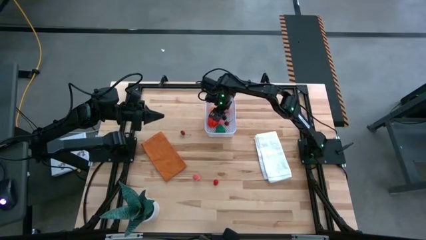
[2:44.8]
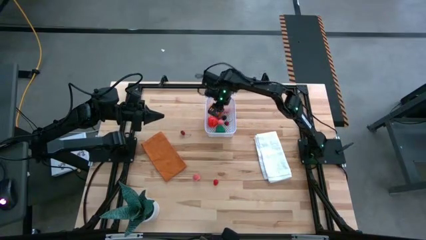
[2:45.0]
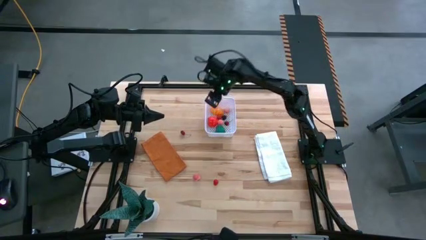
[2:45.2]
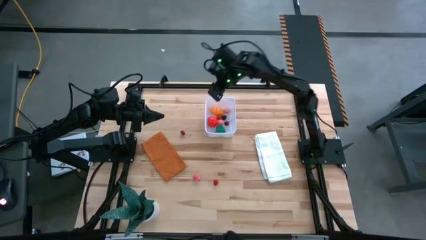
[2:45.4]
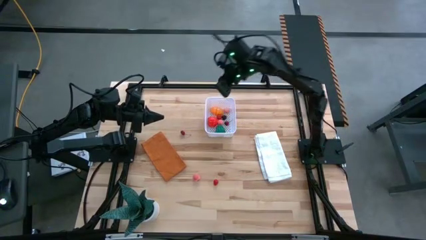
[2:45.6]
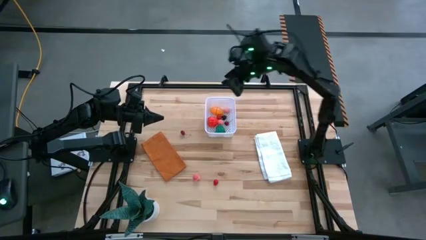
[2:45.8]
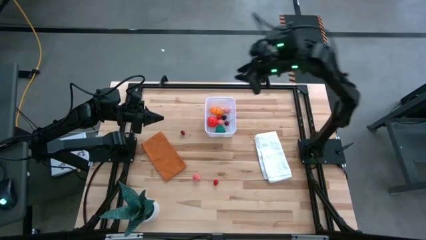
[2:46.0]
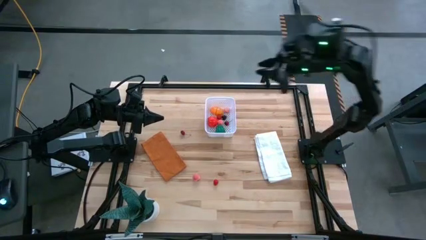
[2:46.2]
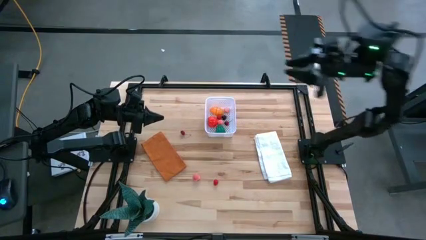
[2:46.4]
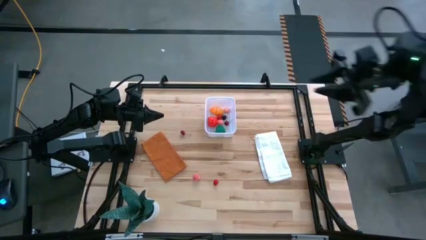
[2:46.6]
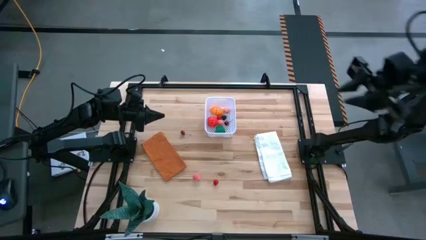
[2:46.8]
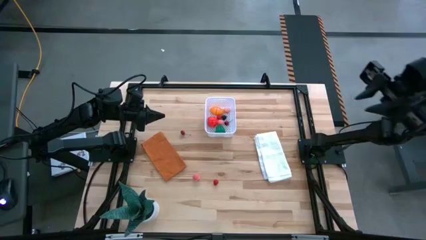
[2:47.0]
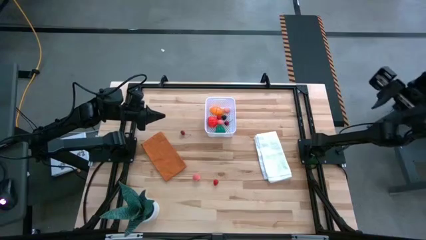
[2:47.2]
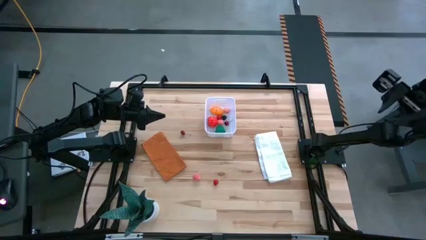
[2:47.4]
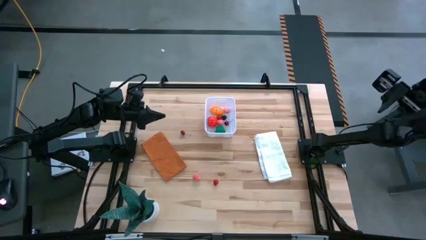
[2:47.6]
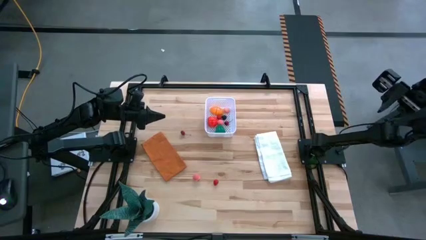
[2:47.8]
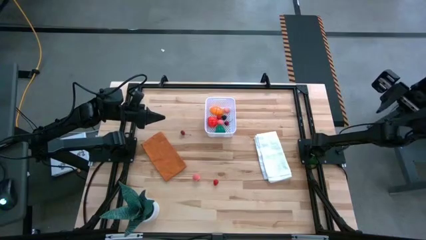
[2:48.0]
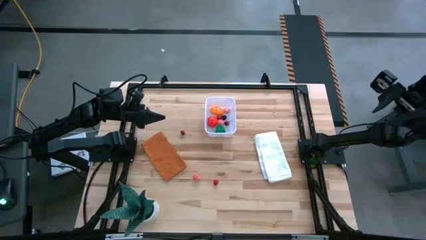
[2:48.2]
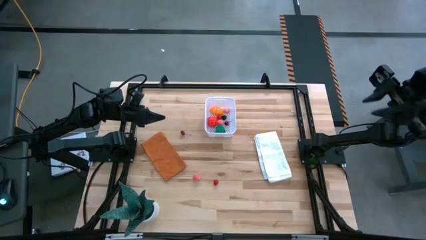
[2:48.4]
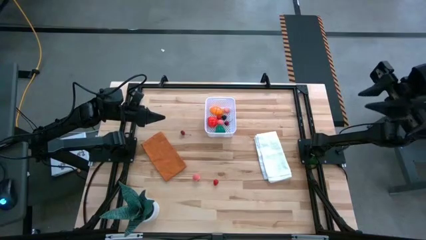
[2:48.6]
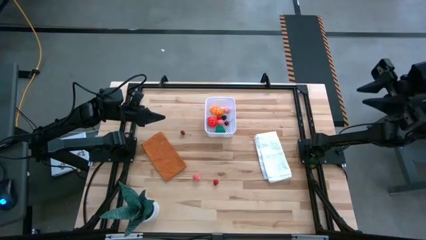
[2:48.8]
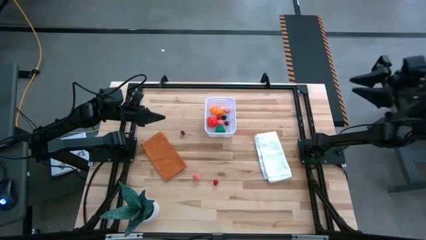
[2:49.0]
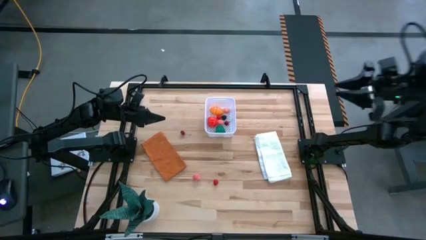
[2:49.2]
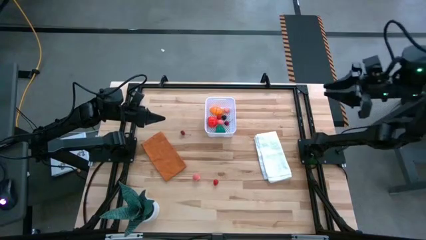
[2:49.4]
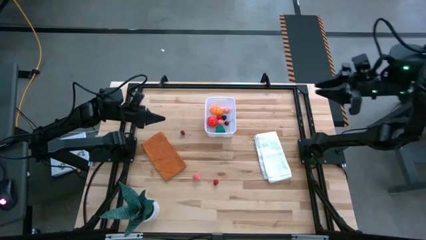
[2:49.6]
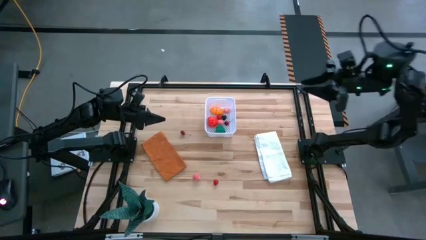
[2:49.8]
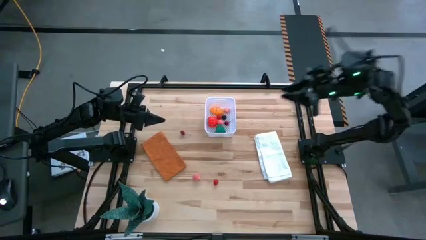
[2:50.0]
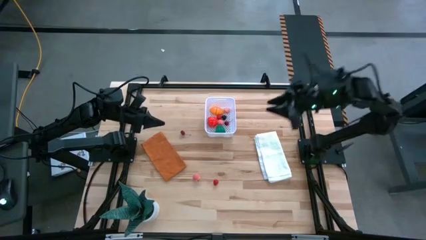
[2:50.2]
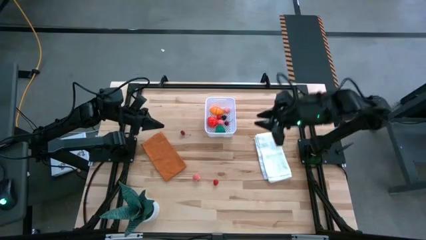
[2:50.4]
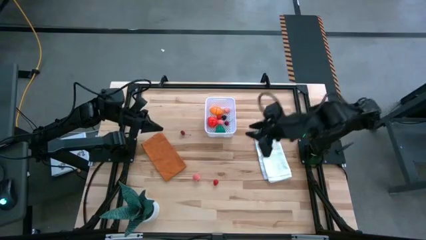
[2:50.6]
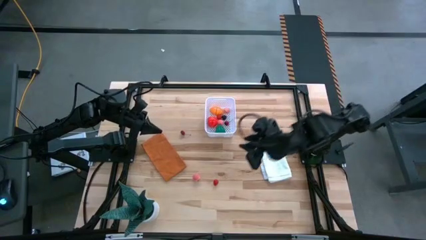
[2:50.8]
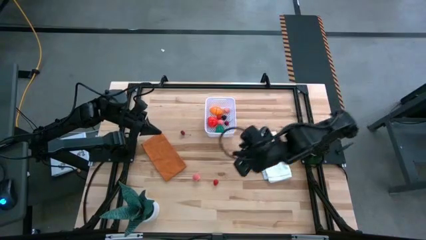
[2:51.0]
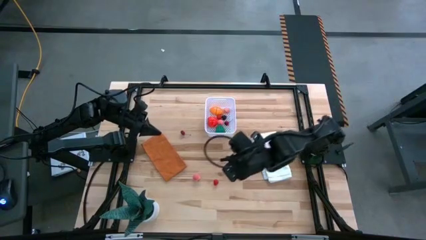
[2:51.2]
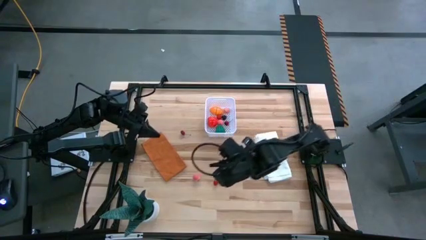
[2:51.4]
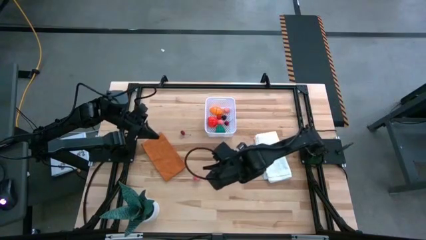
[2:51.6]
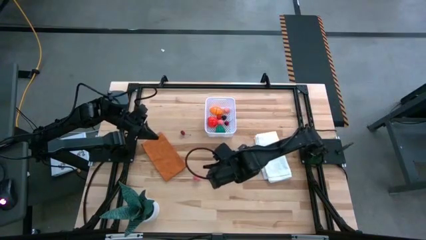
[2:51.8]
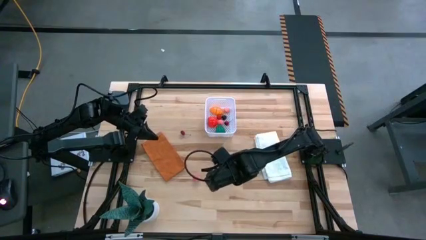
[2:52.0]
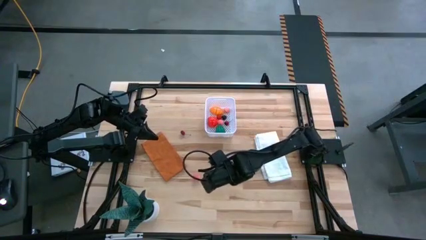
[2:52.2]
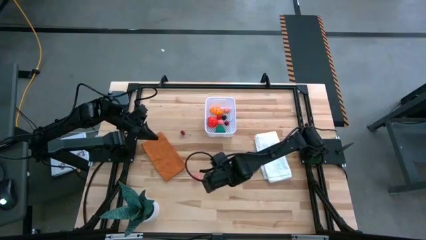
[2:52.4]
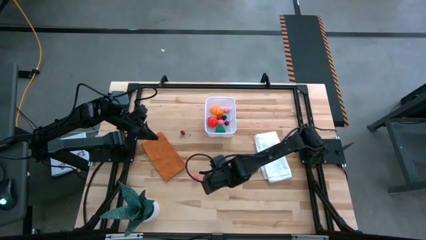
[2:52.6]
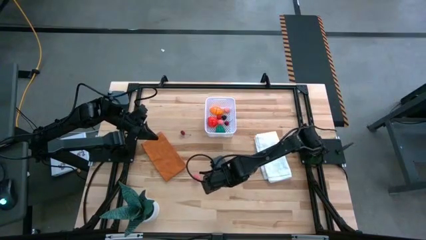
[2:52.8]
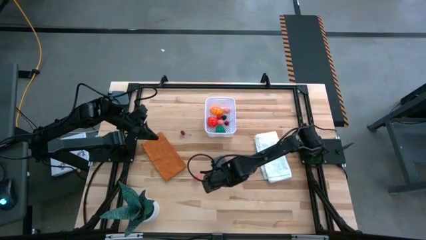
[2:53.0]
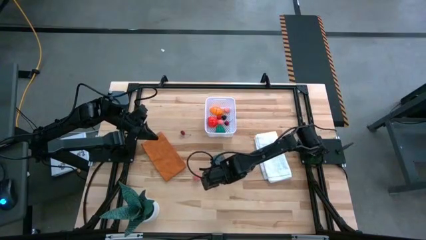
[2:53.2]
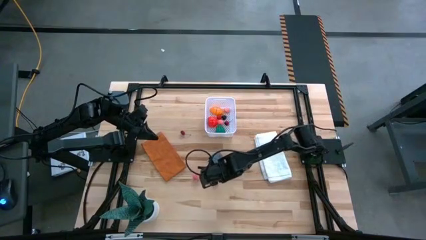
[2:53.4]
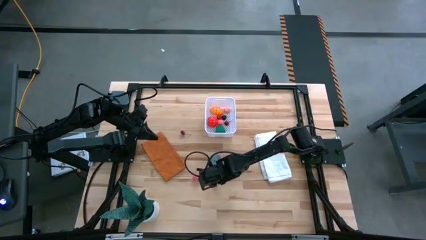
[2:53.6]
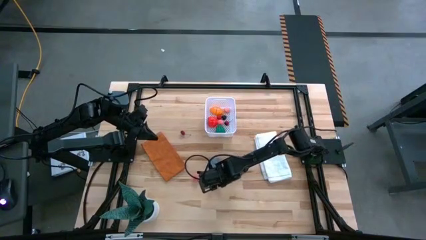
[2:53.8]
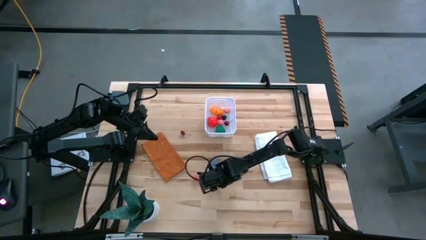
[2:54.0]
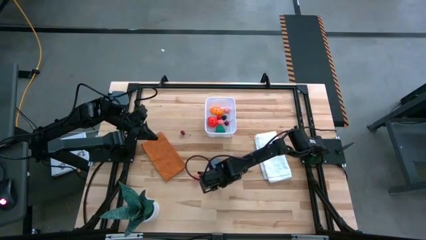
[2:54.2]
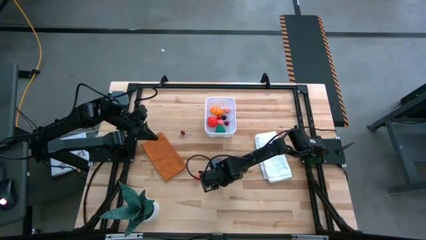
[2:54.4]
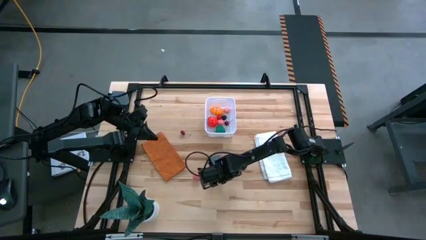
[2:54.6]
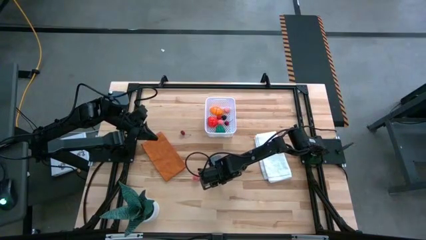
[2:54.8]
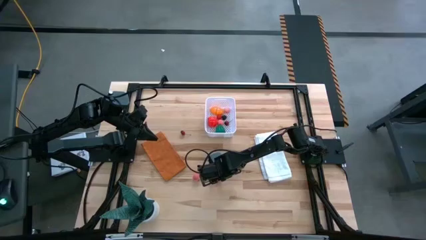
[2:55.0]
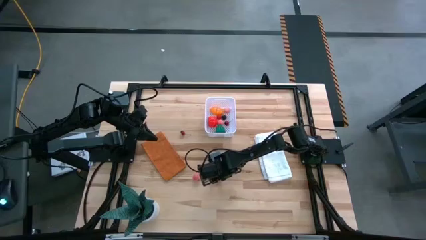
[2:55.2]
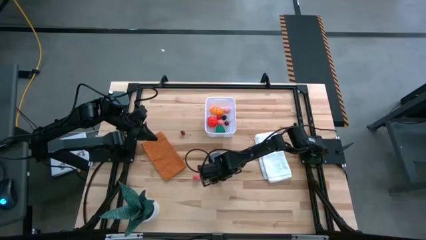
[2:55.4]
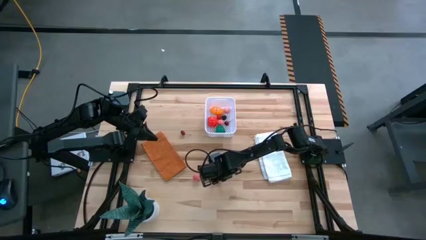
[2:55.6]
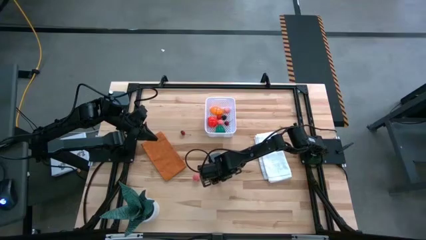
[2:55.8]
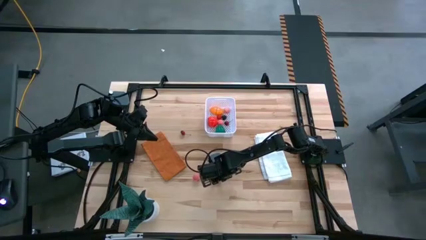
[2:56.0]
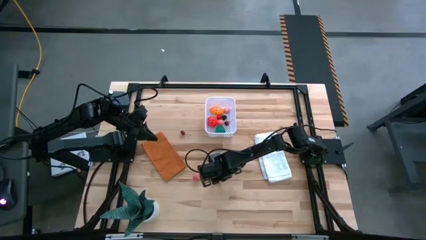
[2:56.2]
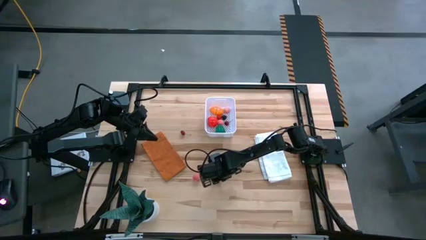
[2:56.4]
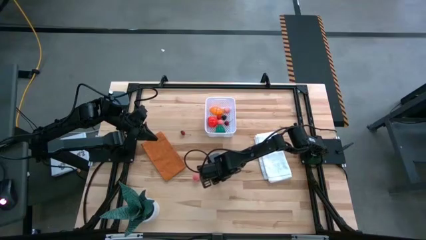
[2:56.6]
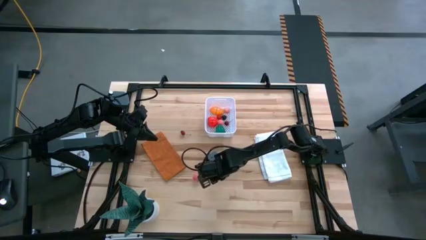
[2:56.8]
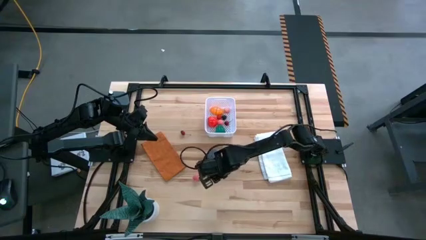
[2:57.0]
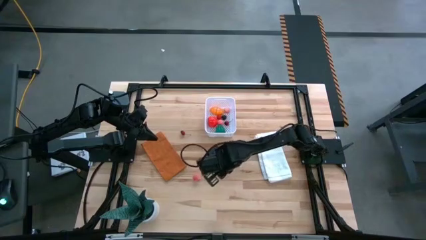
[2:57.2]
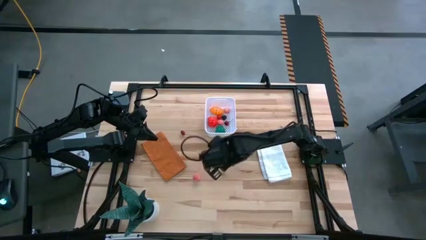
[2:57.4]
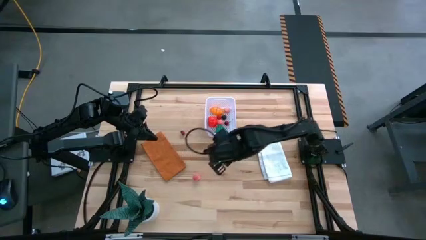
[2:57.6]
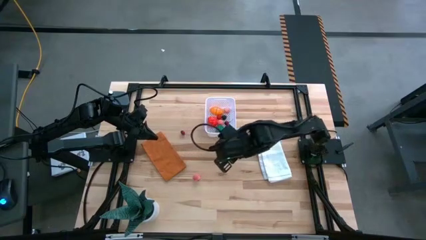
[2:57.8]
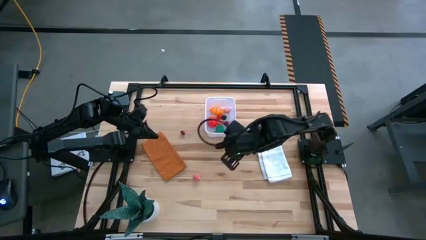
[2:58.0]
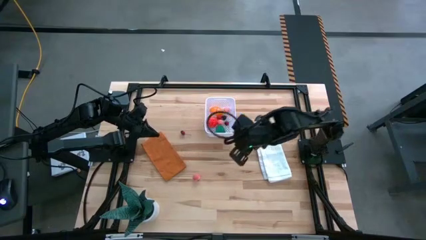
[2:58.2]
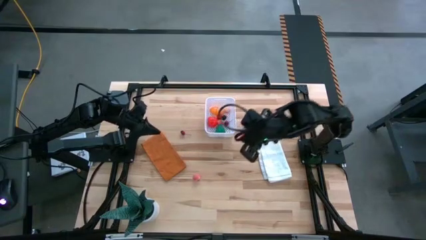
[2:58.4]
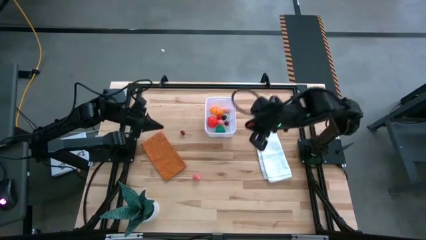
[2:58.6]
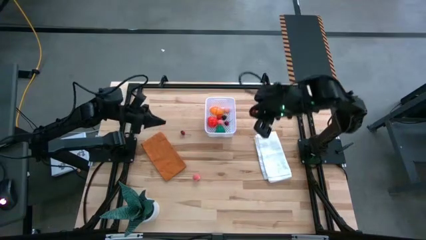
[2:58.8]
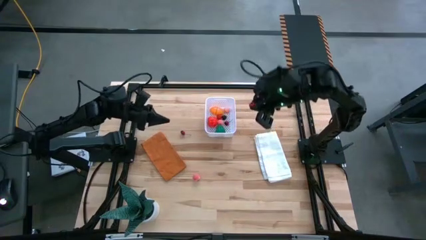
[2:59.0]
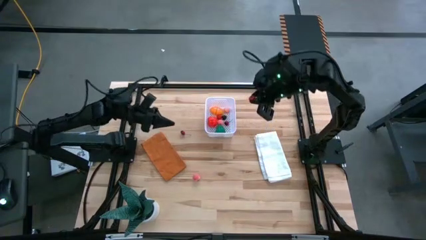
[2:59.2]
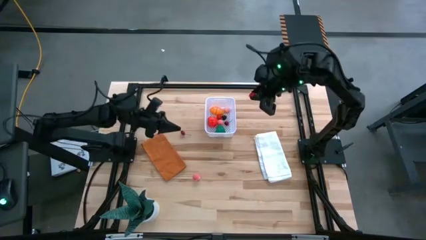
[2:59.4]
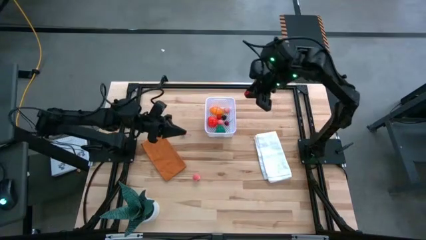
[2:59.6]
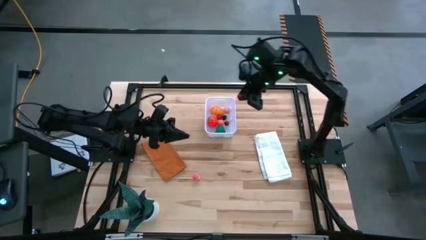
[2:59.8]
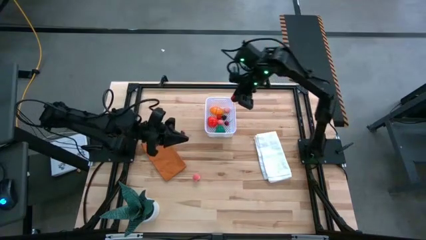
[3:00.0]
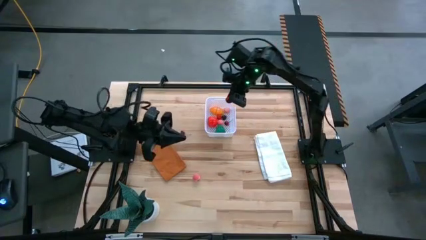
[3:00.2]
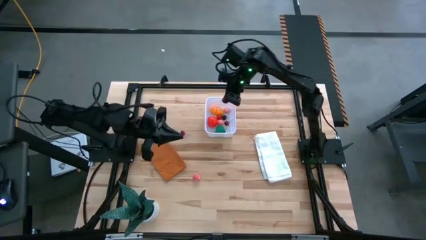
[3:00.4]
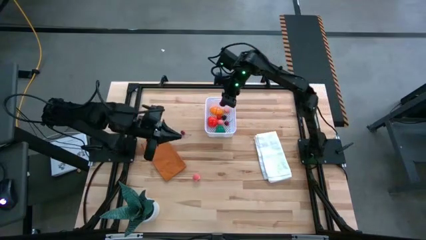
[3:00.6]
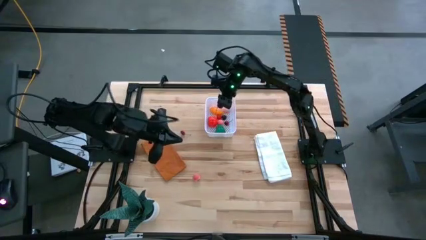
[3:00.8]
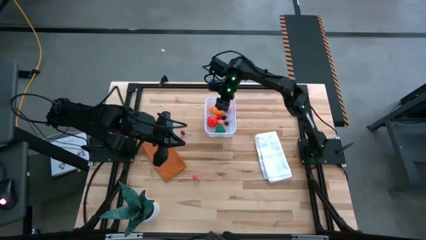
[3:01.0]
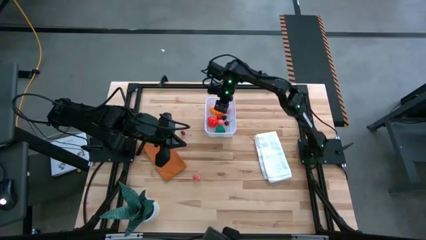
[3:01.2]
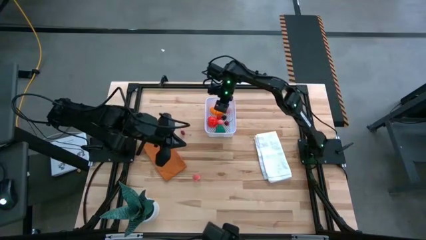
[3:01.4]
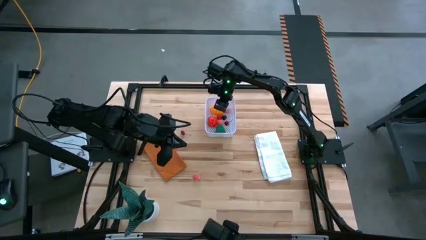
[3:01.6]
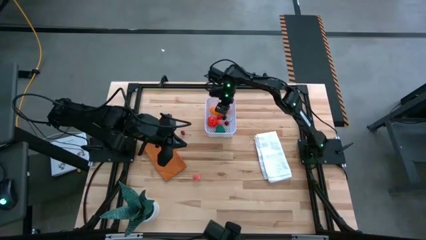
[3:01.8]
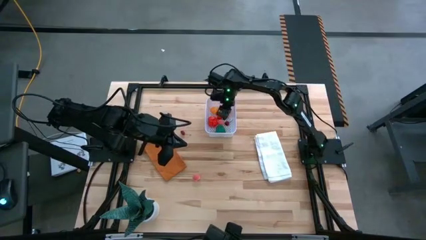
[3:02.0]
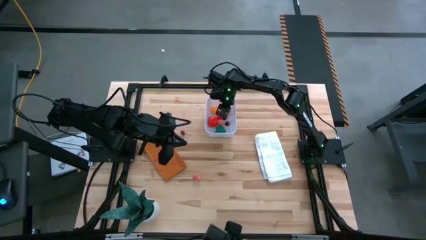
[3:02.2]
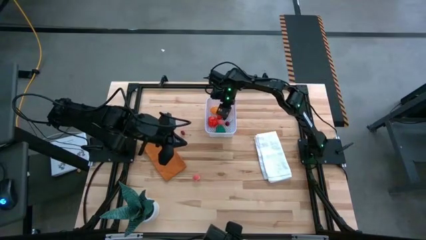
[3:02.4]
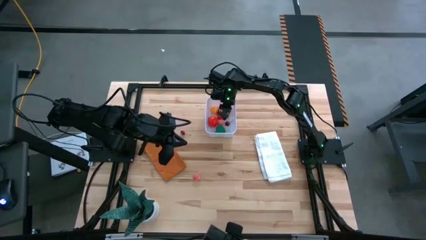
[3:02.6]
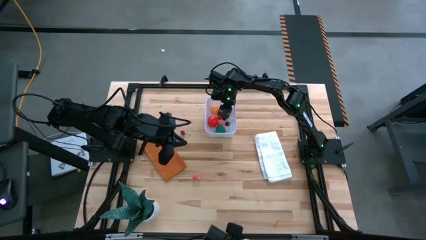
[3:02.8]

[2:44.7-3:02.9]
Task: Pick and placing Produce into tupperware
Put the red raspberry into the white bin
